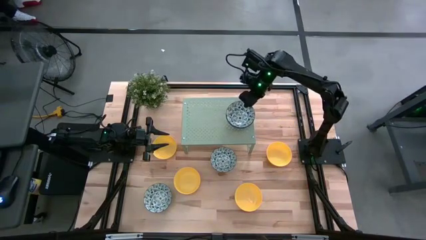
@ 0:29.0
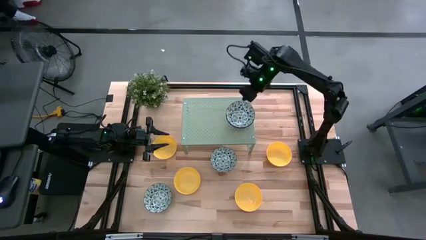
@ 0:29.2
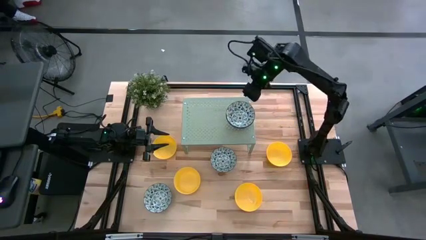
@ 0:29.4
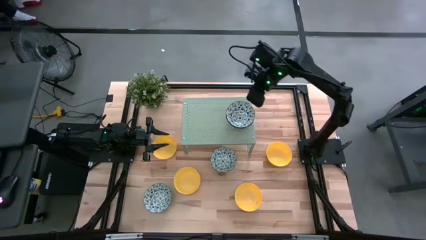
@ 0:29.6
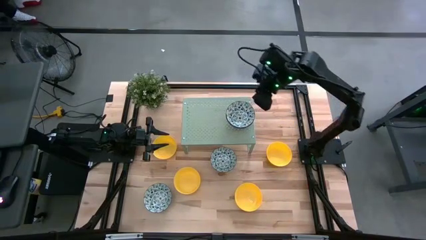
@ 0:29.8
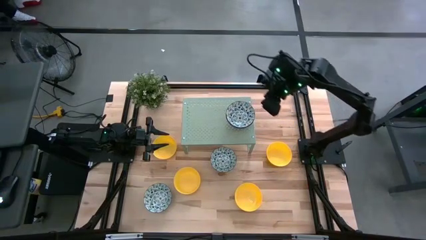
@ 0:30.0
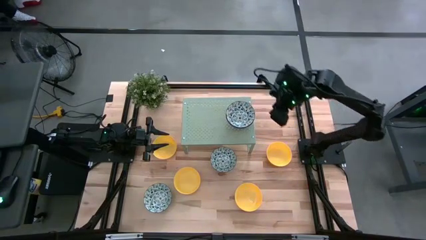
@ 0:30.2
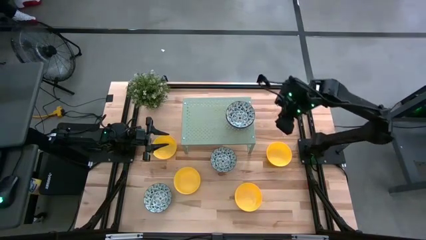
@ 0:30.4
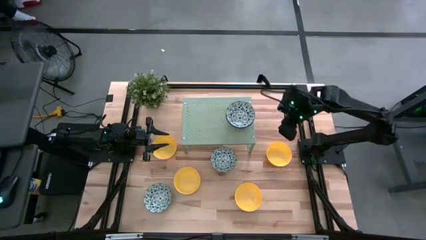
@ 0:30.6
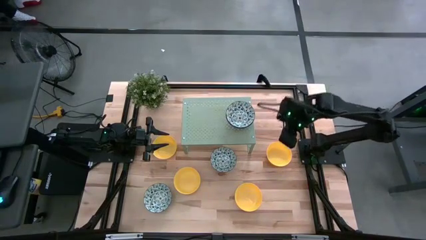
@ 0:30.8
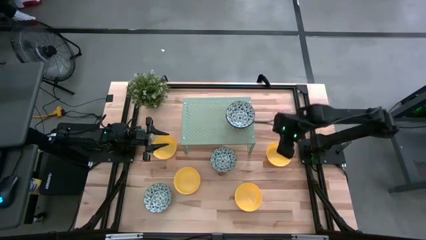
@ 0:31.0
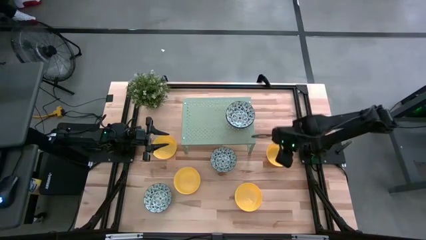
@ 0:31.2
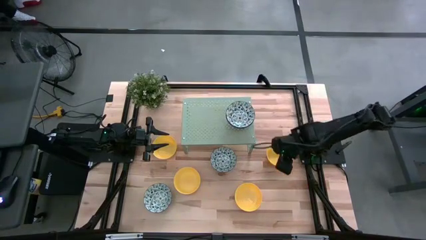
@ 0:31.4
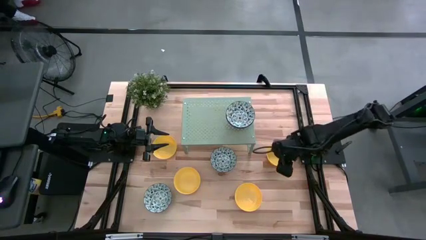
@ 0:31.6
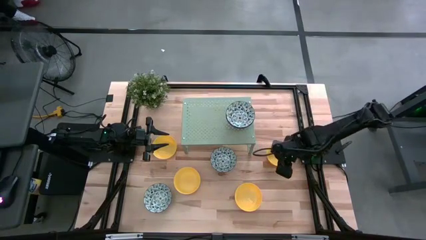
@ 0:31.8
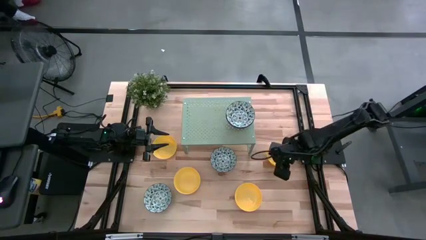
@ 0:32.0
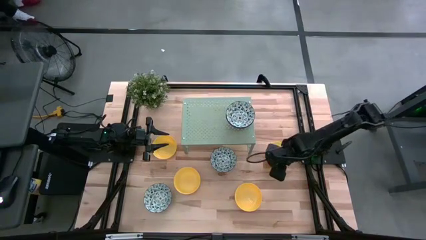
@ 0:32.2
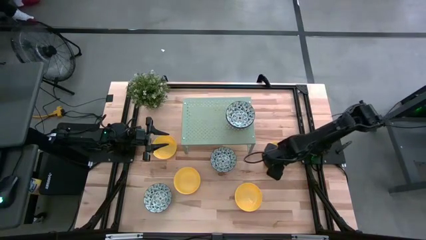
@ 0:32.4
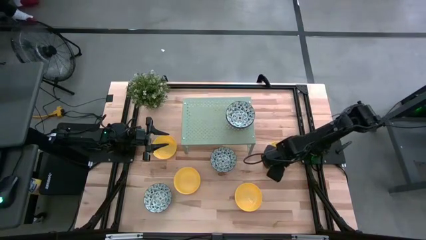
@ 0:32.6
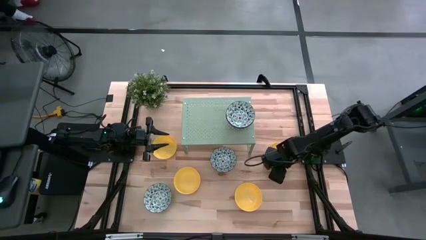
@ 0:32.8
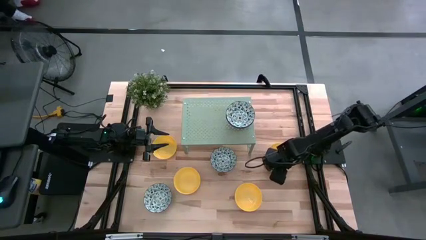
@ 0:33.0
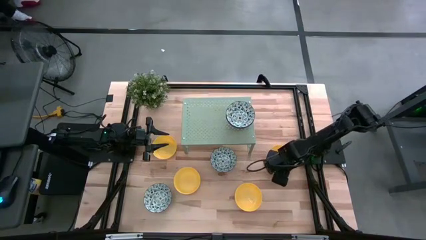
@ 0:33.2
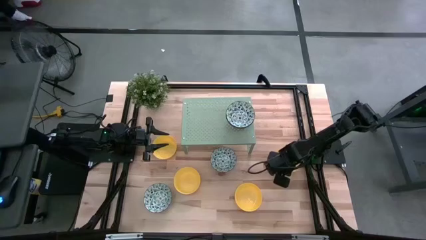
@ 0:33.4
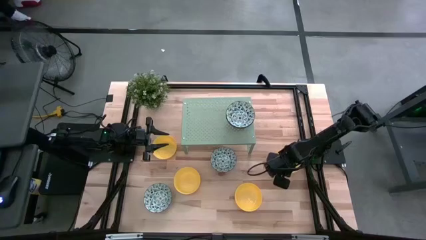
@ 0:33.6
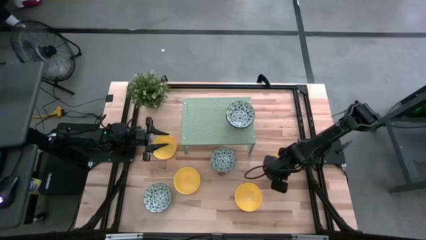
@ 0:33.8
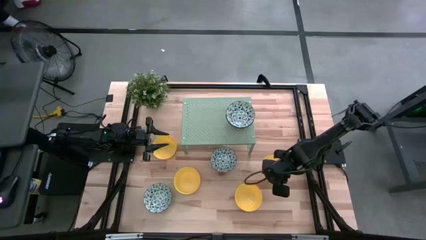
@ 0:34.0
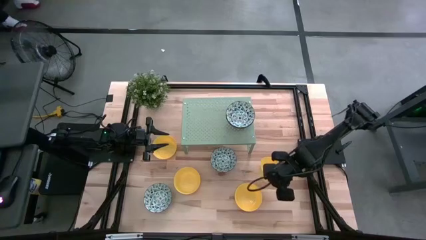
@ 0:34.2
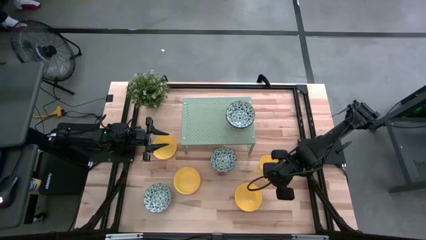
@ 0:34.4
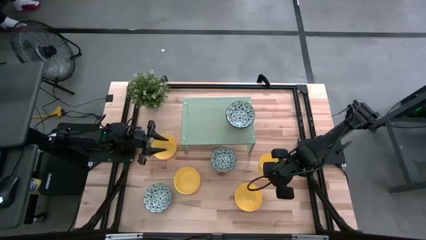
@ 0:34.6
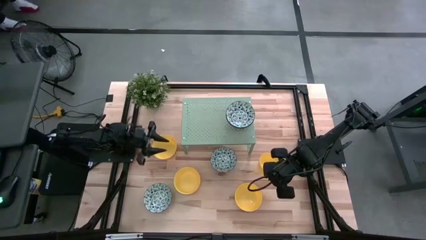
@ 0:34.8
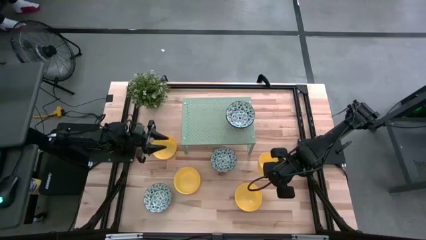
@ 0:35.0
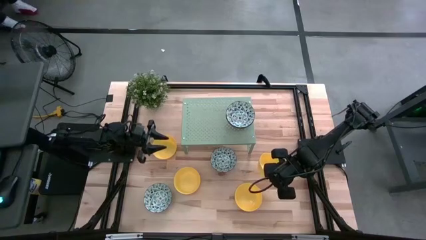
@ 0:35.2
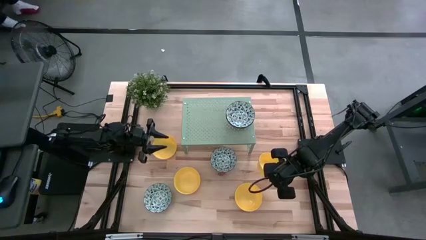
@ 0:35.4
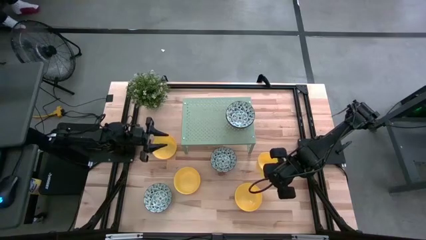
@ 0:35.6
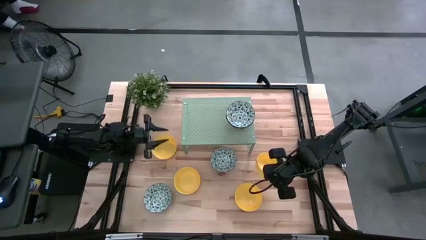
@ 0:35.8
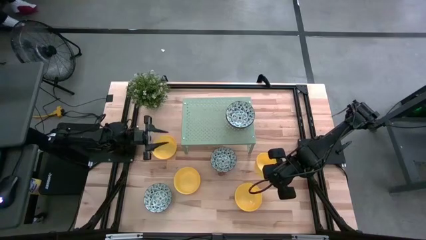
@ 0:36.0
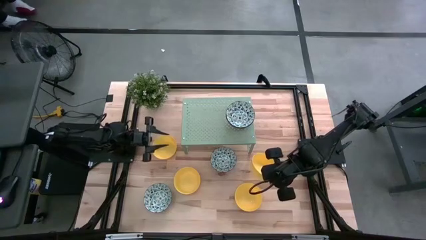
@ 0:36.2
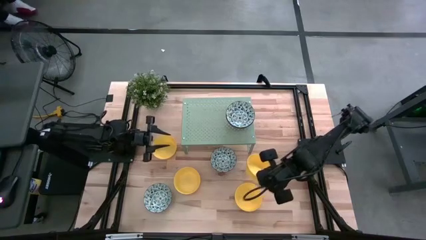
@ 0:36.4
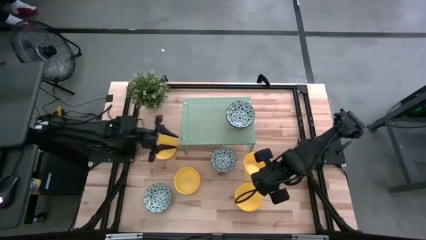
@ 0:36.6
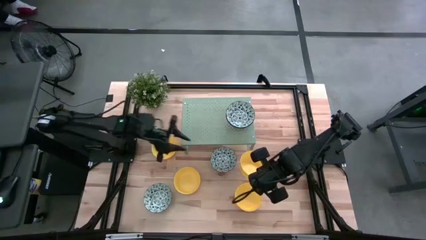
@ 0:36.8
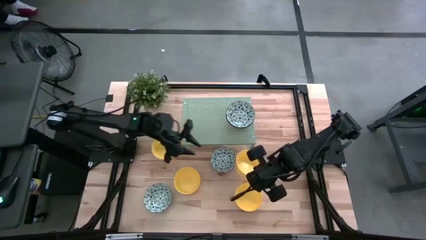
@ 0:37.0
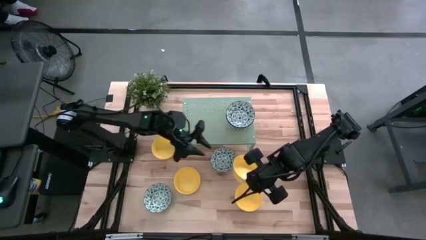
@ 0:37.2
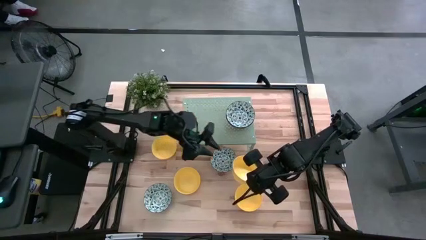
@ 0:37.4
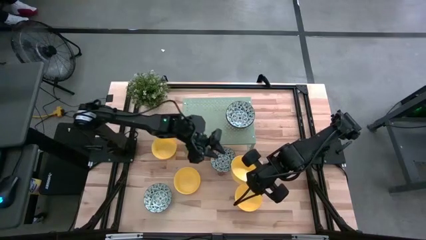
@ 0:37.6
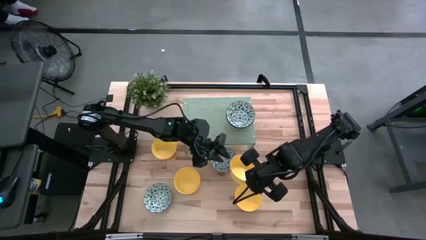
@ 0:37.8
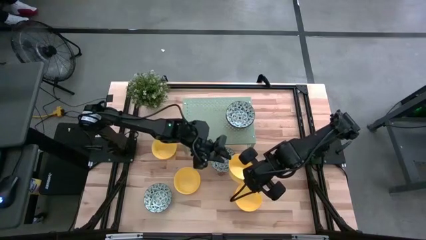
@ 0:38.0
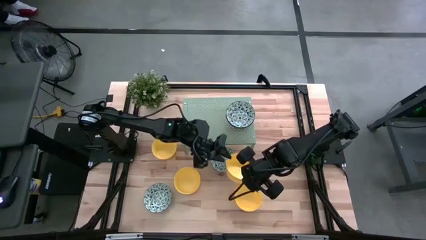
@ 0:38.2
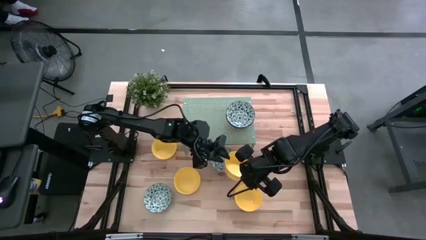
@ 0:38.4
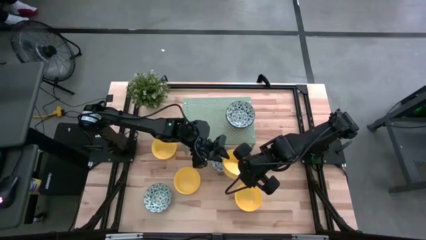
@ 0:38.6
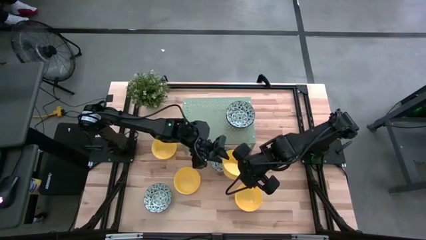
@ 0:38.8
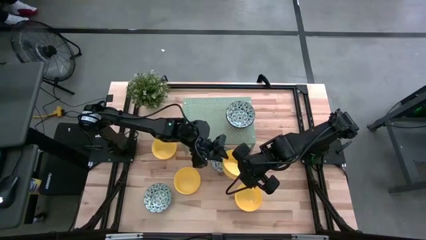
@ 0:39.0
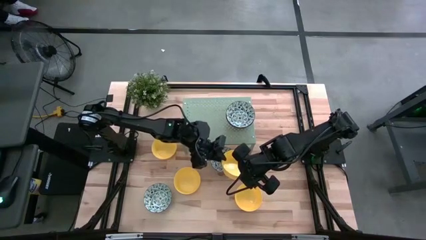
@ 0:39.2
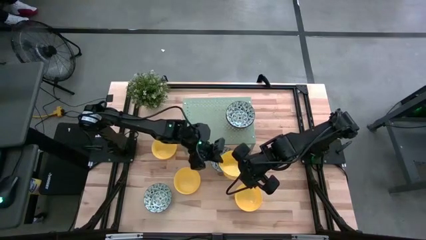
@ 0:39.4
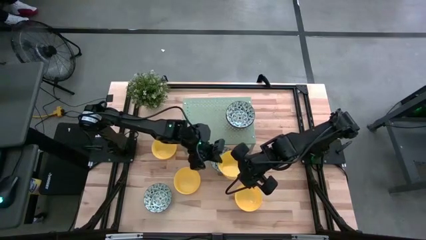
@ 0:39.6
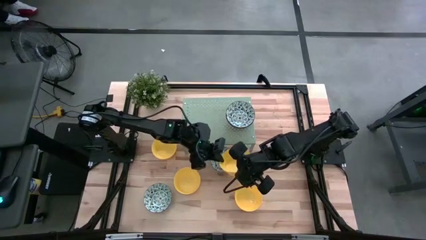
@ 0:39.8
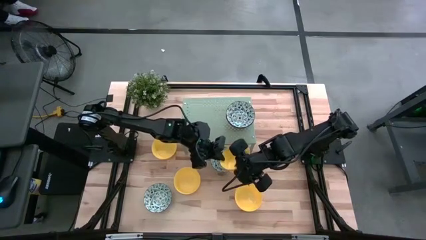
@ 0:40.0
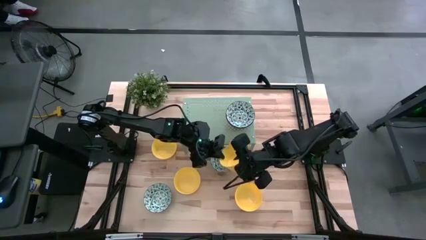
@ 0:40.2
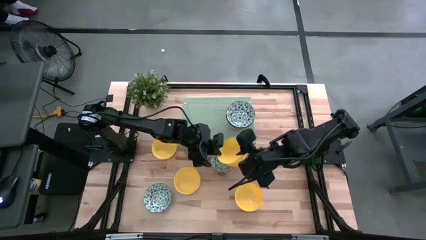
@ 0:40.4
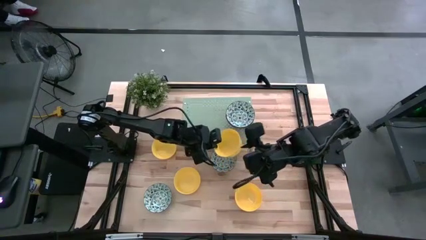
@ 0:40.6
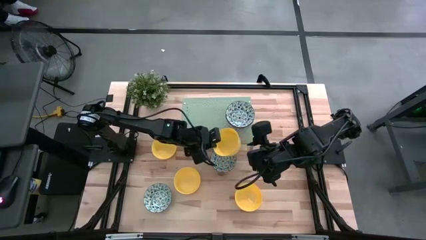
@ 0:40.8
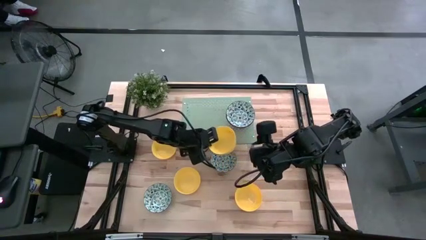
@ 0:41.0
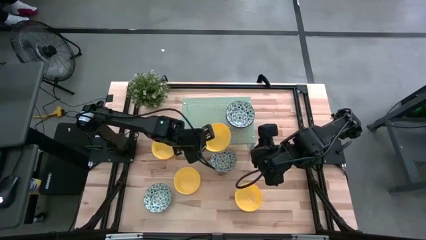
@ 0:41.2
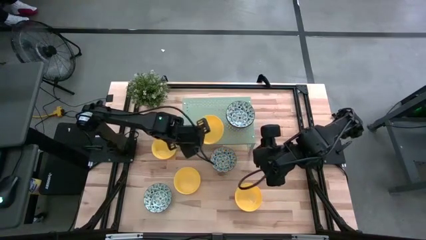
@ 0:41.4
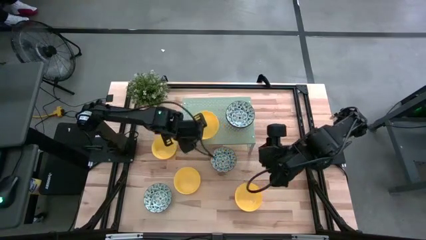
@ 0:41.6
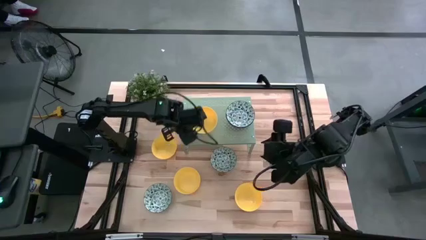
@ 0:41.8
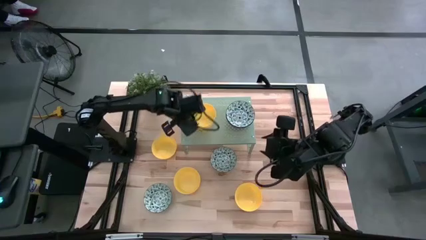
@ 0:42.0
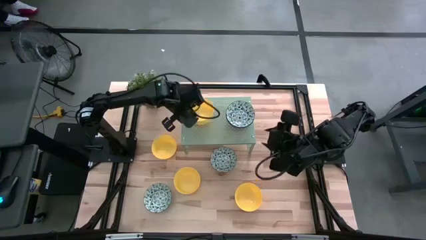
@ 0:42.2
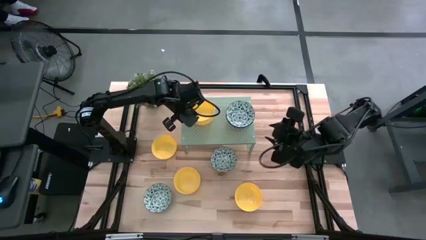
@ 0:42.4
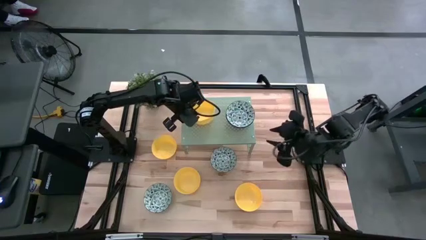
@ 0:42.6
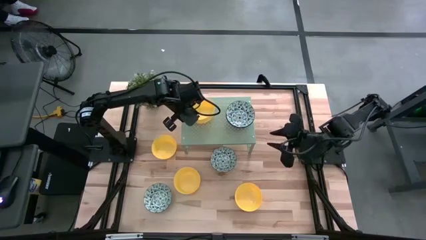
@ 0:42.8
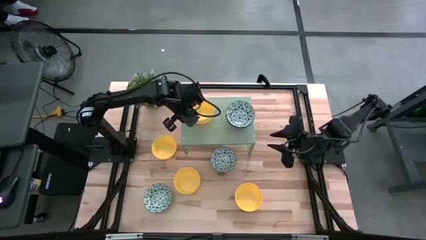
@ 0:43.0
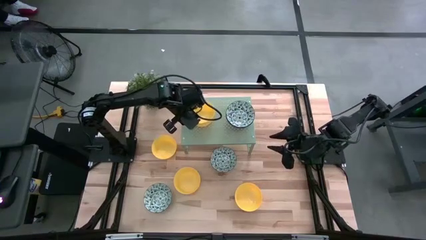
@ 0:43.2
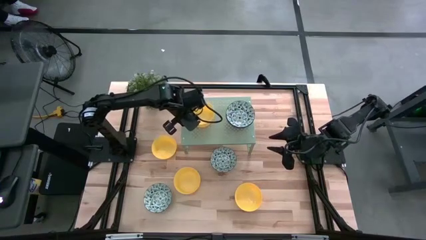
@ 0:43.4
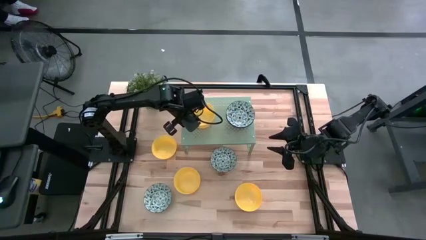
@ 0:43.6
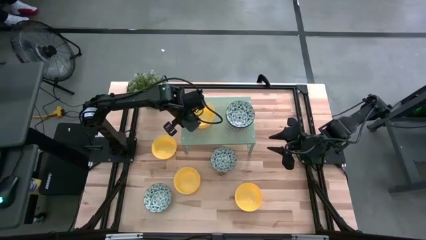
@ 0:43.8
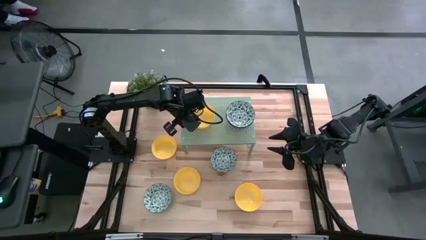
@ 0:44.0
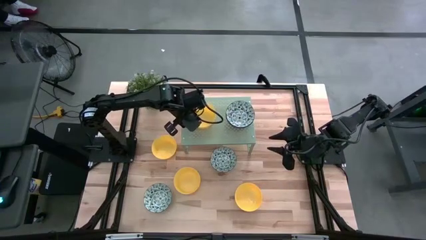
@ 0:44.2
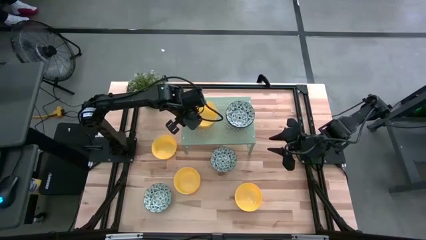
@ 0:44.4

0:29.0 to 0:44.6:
Task: Pick & Place Mini bowls
Put the middle right yellow bowl on the shelf
